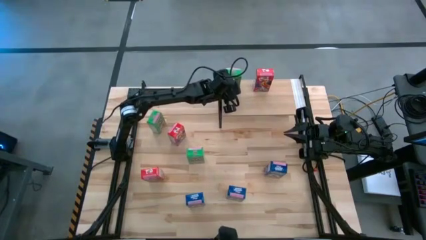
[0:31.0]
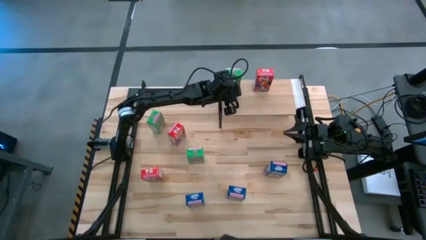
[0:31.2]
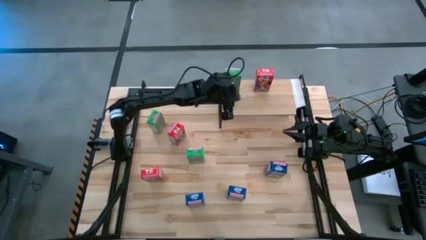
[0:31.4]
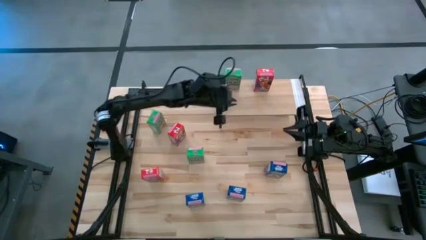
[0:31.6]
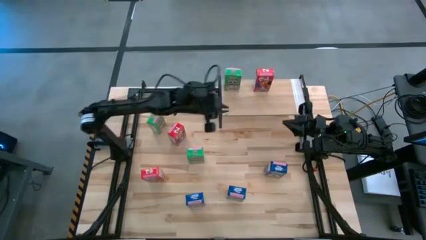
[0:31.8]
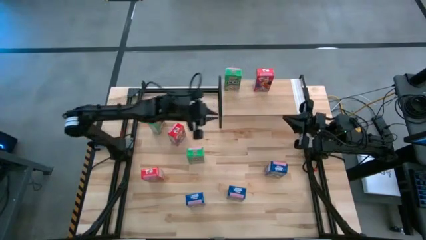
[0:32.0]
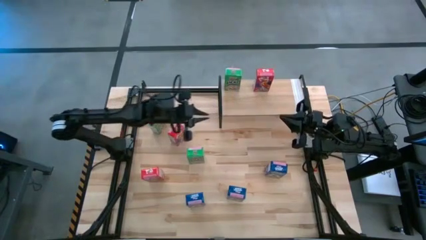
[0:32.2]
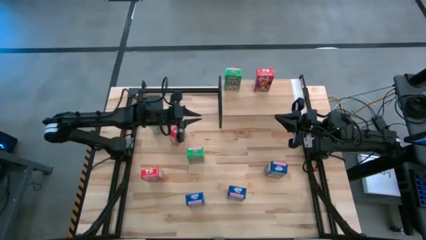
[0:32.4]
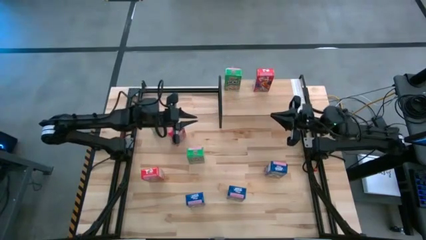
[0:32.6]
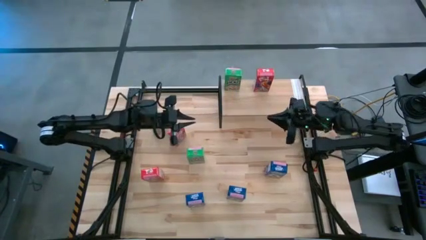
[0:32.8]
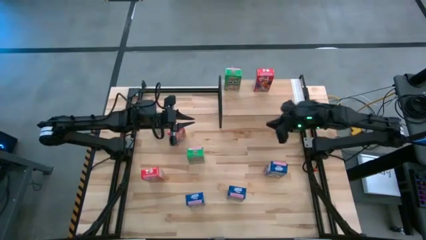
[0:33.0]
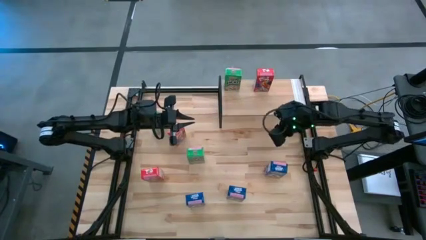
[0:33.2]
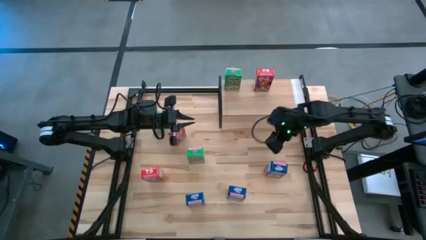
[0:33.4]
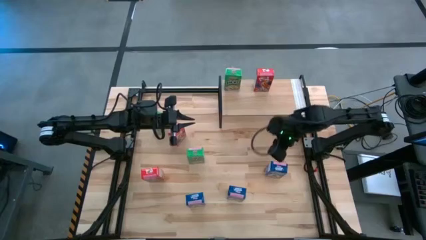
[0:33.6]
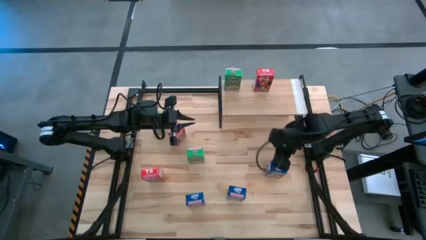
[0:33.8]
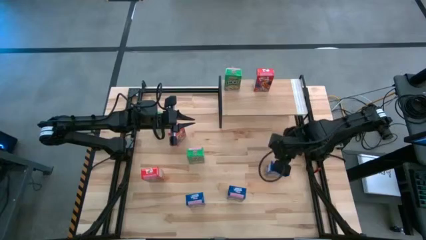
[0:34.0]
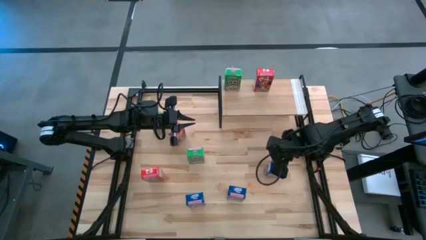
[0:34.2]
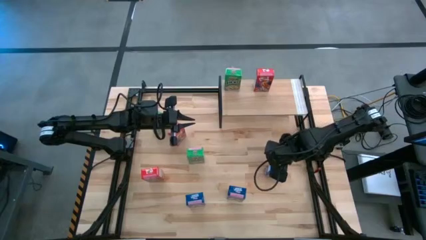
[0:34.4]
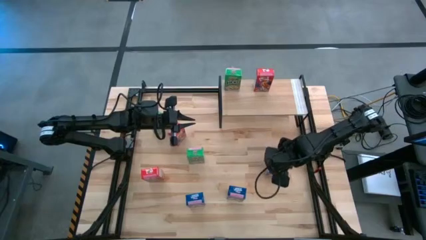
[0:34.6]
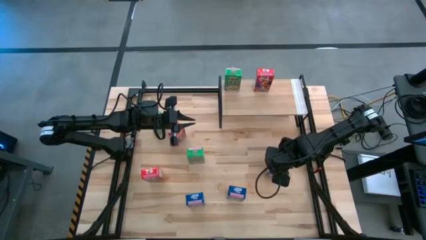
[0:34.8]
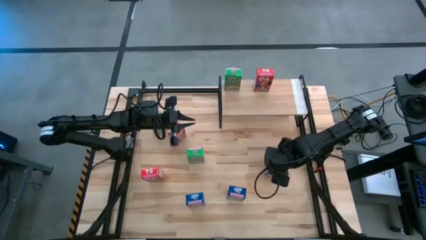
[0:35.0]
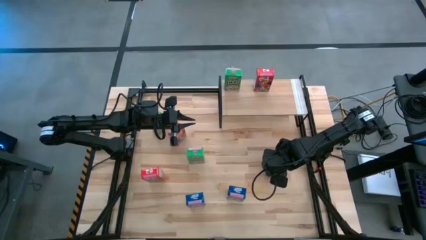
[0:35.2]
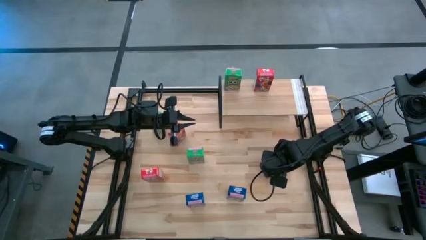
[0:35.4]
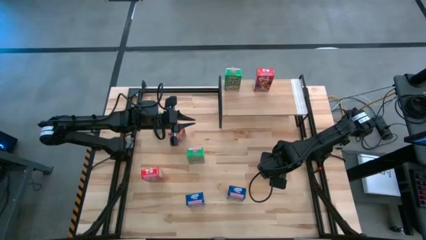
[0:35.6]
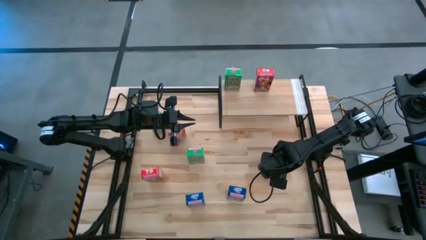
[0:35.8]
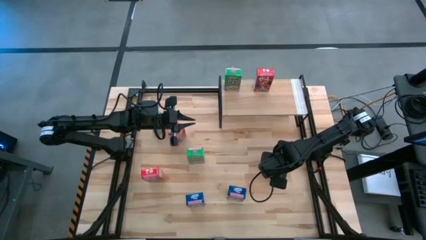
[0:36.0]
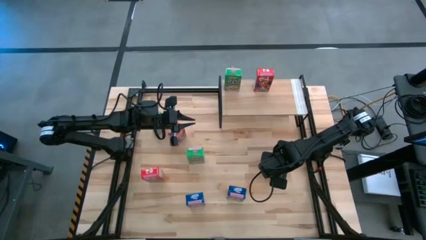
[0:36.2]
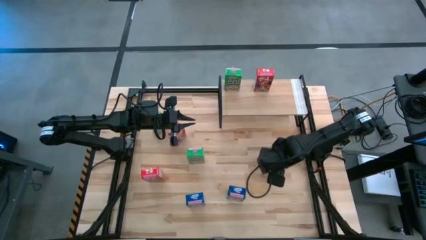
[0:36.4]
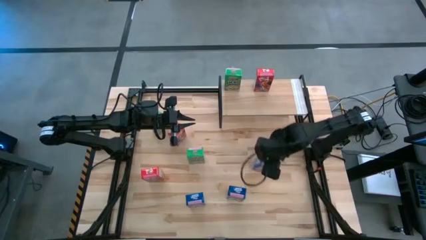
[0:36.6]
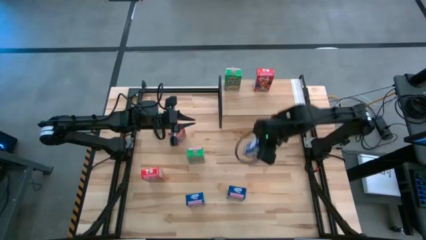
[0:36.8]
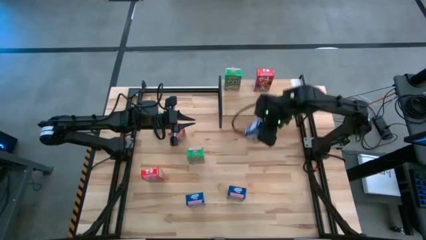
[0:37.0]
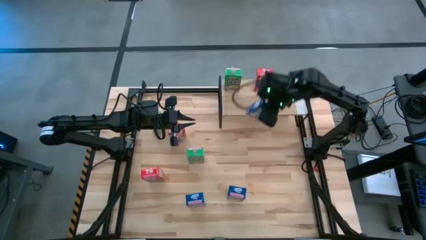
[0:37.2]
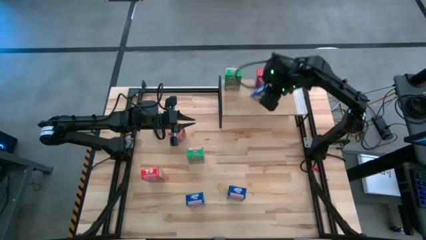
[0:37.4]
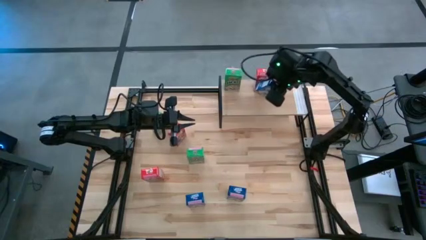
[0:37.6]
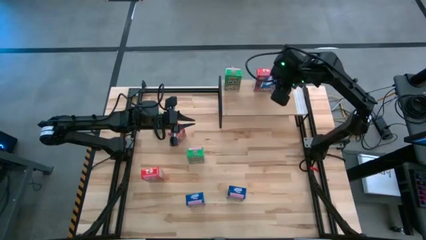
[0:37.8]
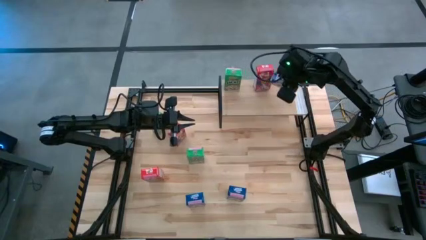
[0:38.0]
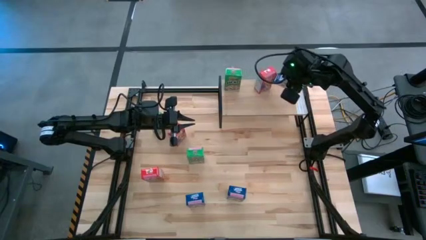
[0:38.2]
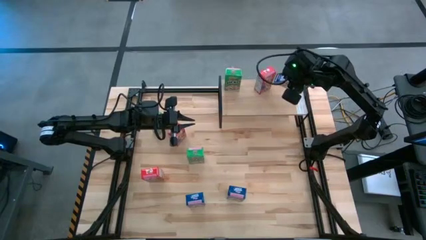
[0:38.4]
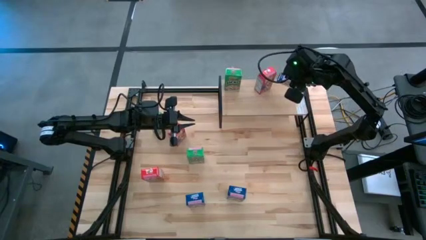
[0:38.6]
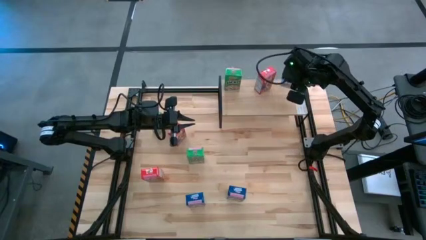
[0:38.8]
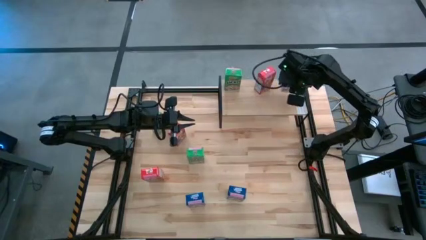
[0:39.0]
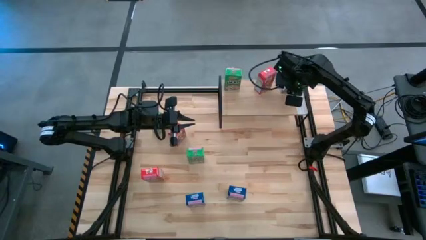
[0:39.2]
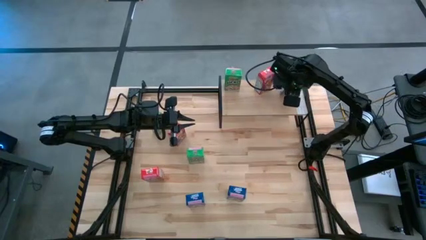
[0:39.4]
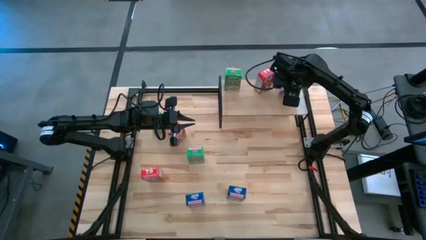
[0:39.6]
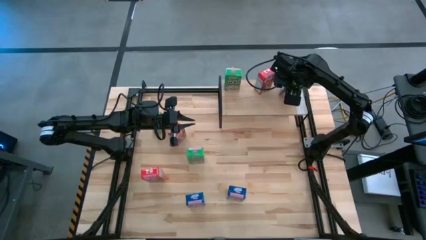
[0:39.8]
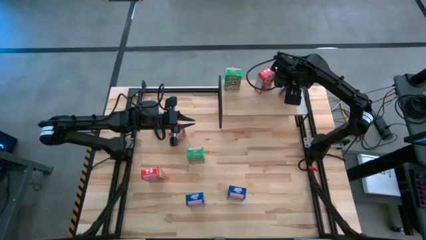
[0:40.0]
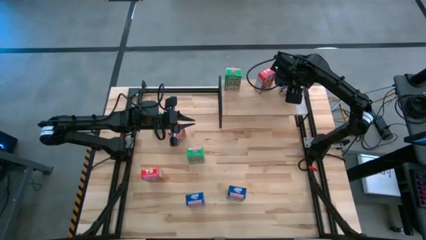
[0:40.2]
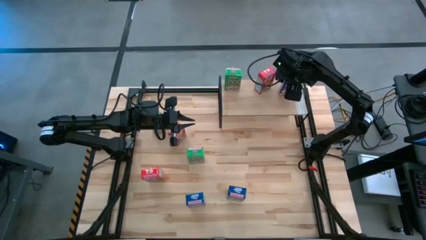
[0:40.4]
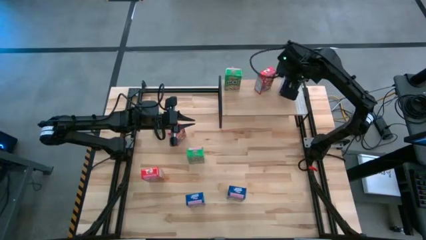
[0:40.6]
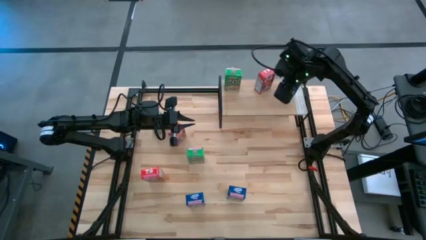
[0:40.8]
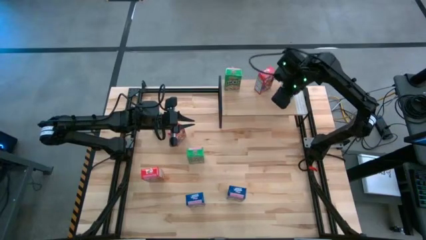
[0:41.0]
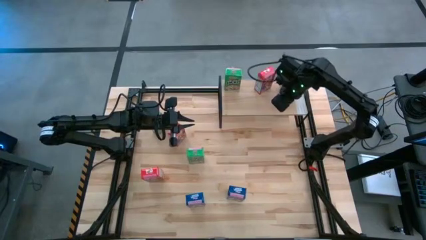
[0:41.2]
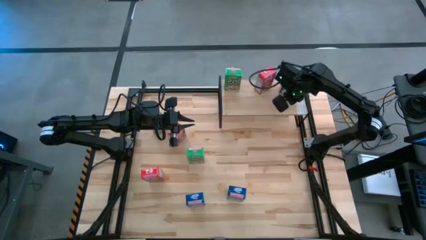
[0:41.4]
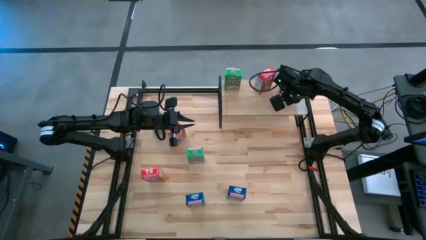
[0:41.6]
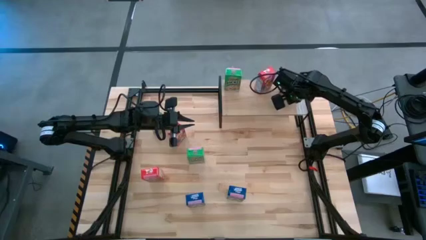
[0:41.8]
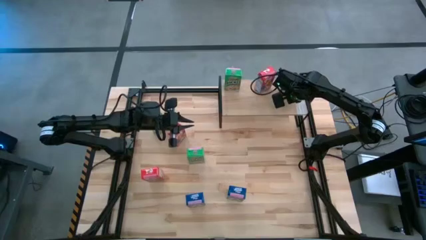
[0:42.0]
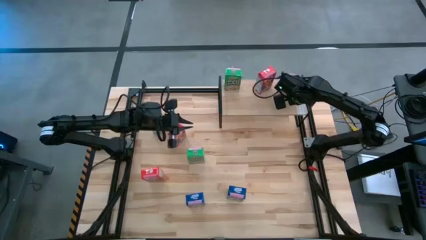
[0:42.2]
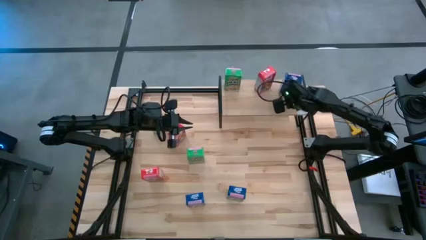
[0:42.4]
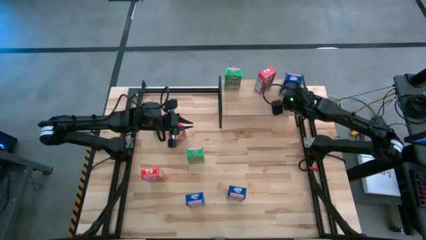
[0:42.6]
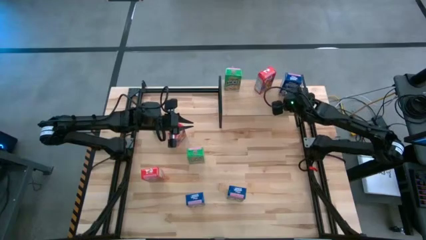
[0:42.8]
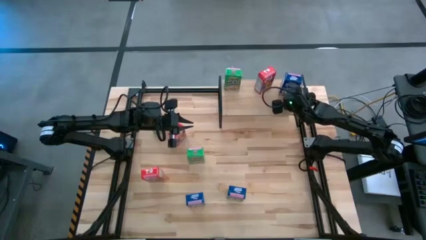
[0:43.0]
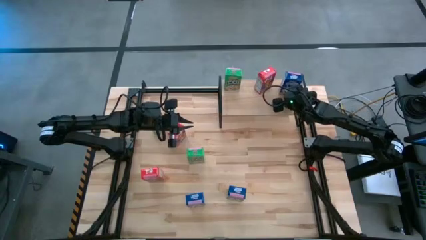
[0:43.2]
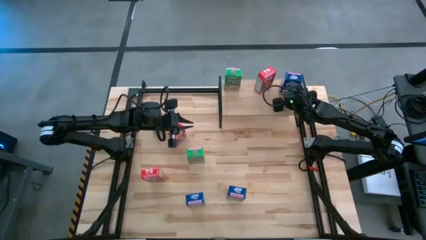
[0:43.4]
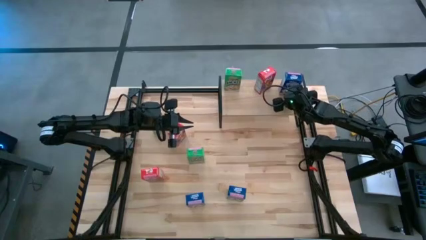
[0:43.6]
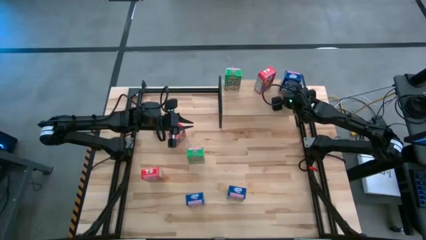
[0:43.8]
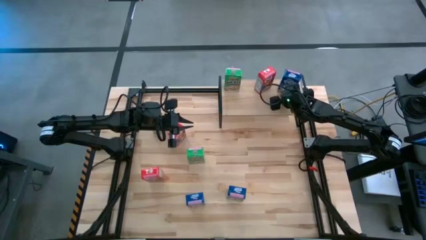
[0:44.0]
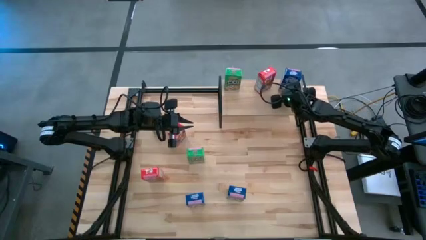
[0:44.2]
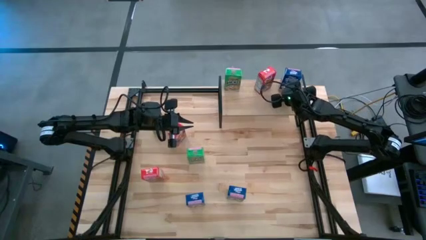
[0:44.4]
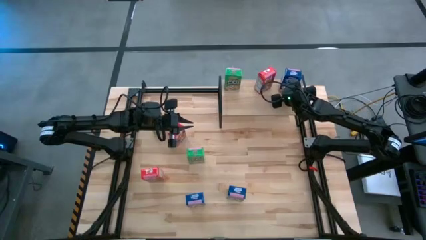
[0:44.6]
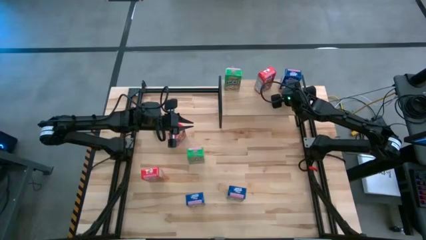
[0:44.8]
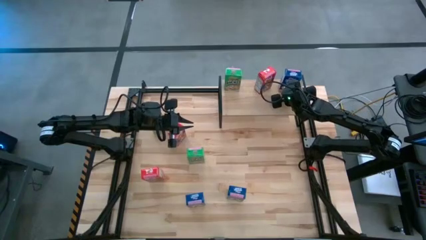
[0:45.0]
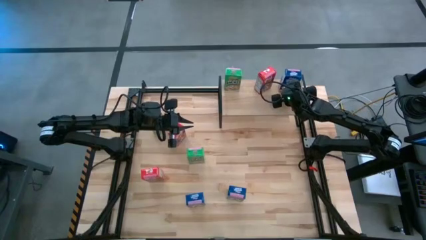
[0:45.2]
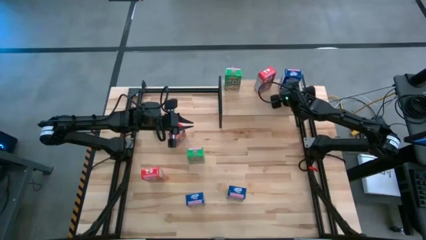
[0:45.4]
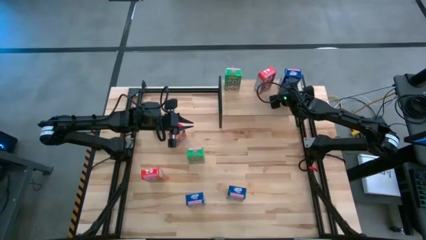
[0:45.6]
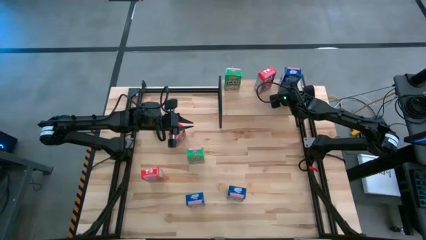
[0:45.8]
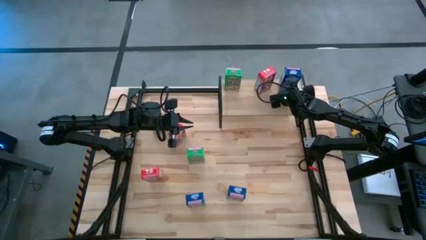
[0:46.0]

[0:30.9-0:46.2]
Task: Stack cereal on shelf
Put the right blue cereal box on the shelf

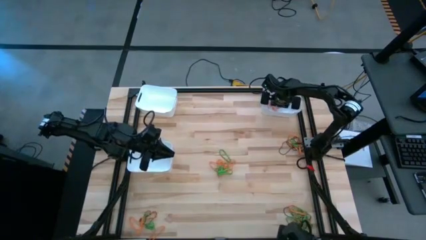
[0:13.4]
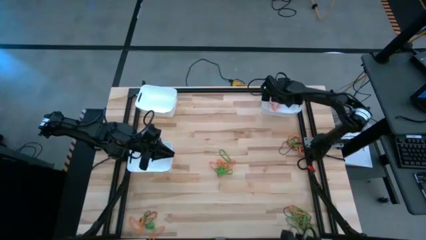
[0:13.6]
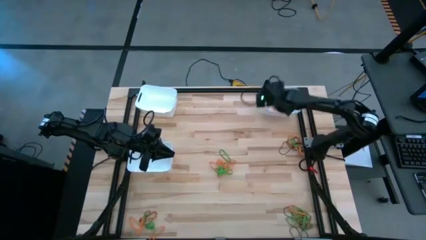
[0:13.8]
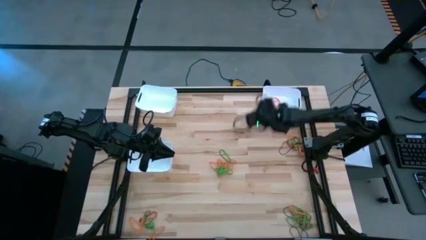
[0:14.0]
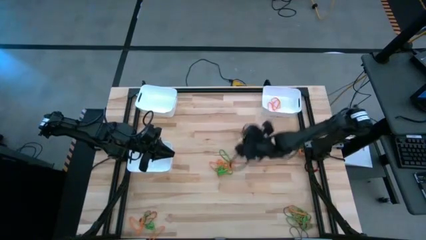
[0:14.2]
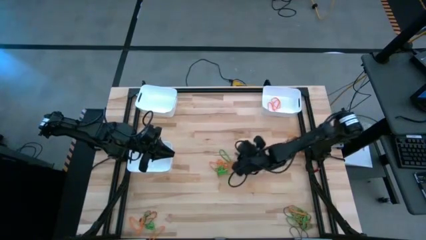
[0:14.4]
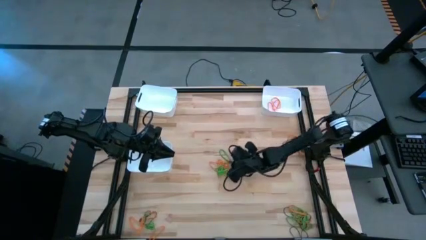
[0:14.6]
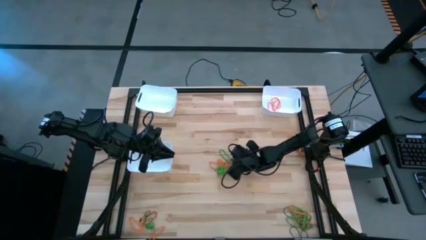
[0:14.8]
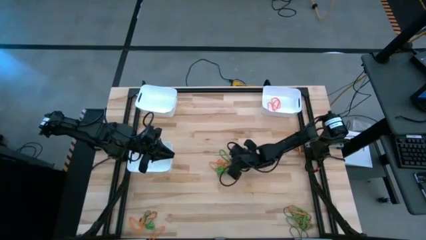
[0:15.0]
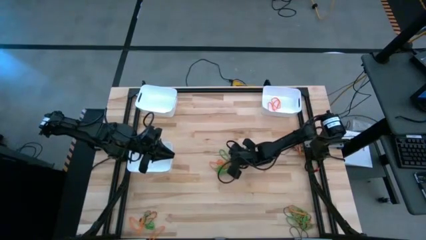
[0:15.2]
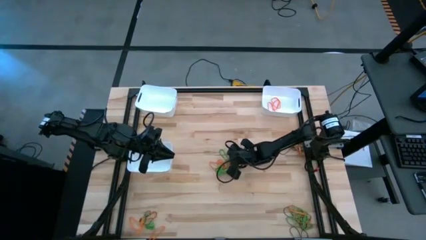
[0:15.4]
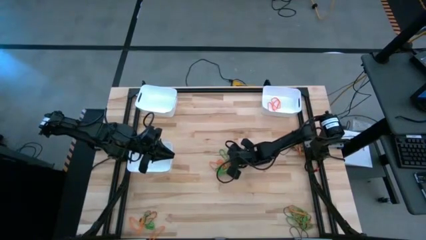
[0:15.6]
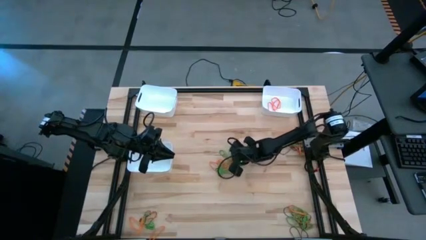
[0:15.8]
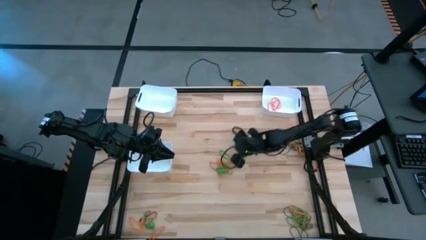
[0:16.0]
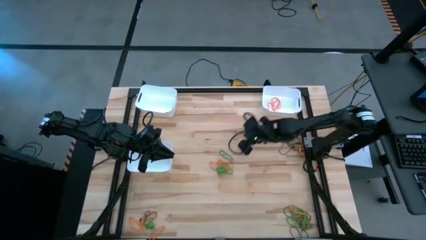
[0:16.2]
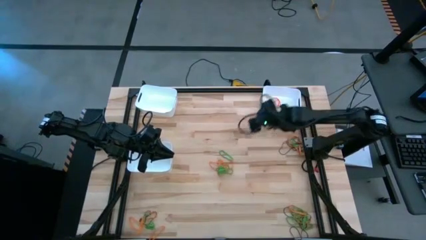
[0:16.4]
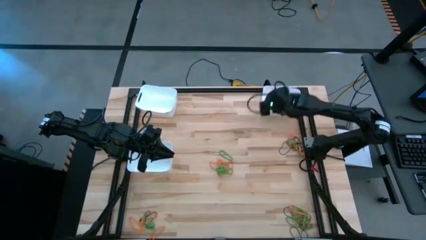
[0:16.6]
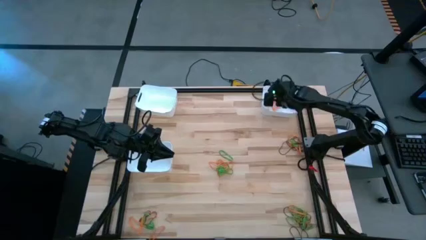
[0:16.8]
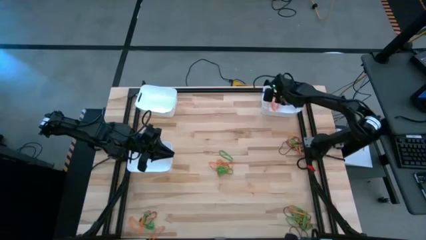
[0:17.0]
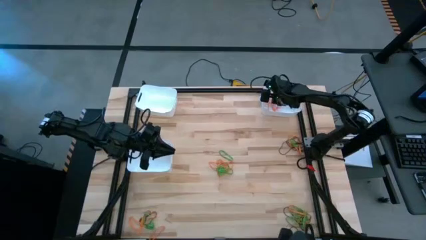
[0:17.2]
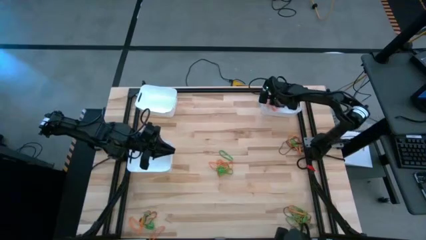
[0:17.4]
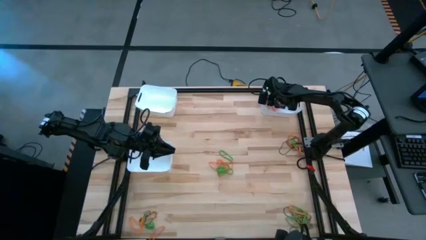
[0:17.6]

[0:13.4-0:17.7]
Task: Sort rubber bands into baskets
Put the orange rubber band into the top right white bin
